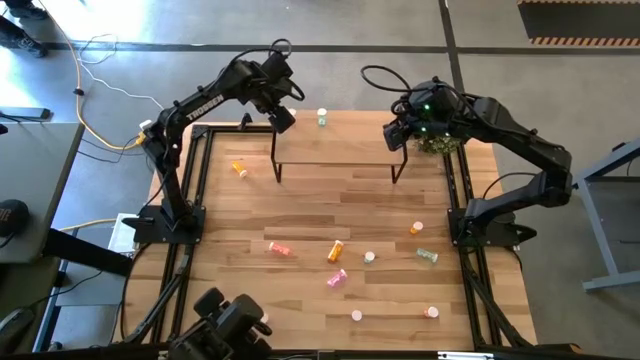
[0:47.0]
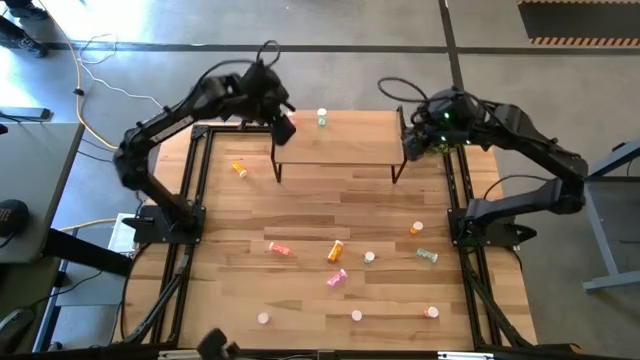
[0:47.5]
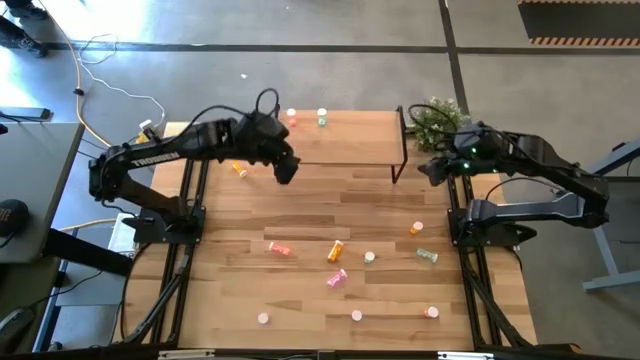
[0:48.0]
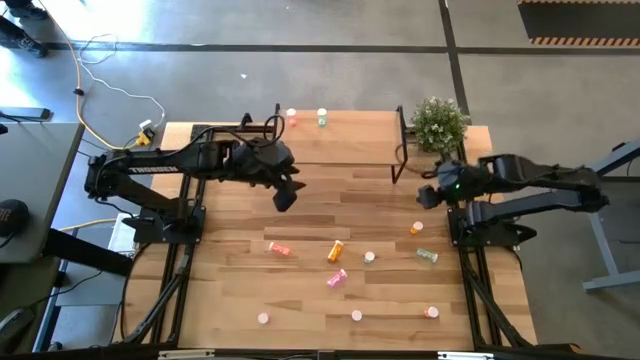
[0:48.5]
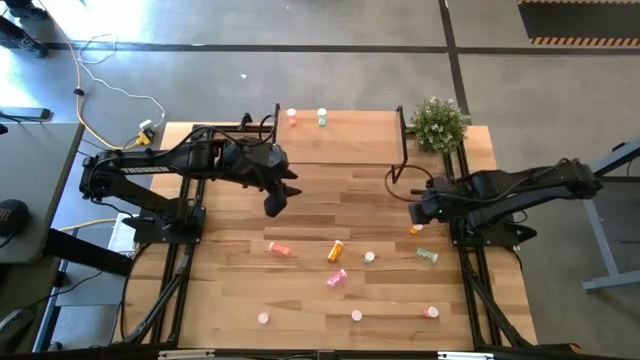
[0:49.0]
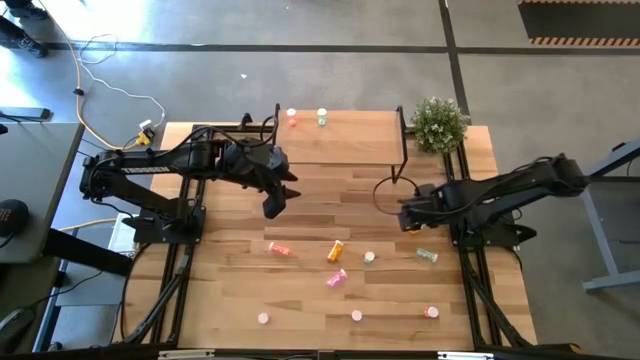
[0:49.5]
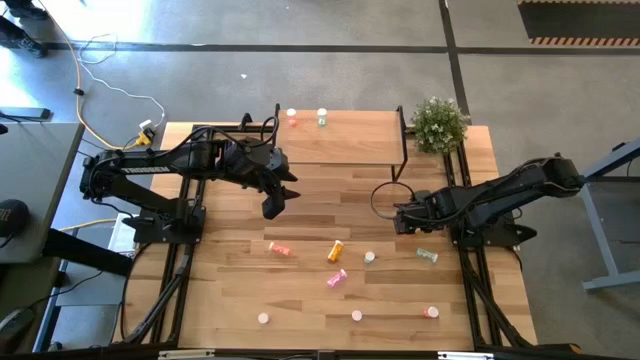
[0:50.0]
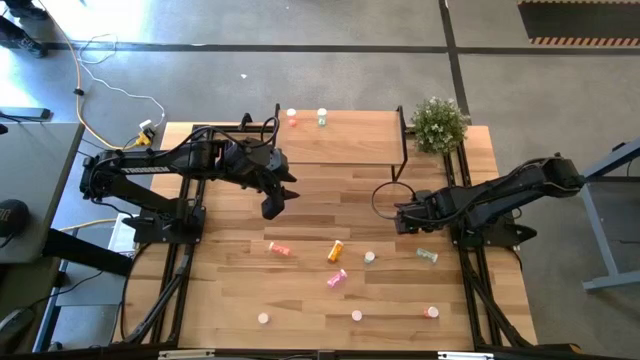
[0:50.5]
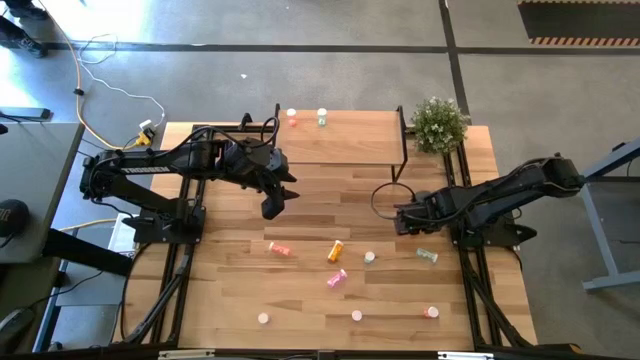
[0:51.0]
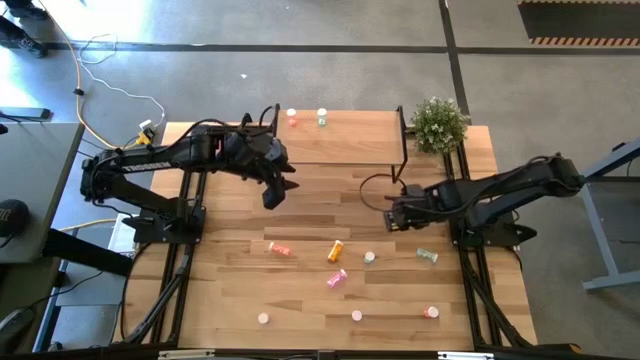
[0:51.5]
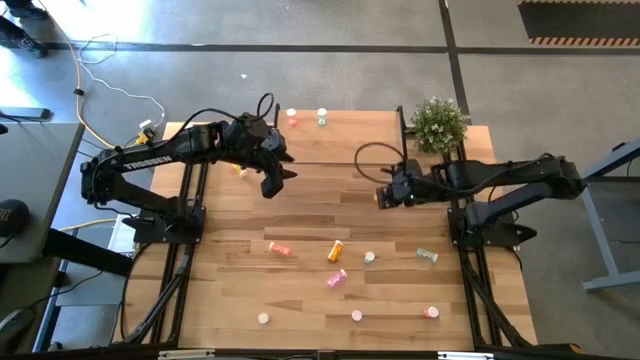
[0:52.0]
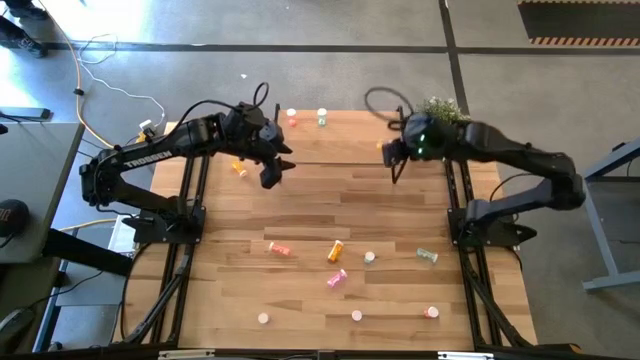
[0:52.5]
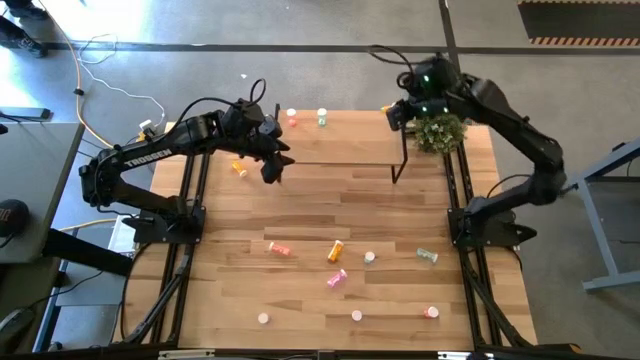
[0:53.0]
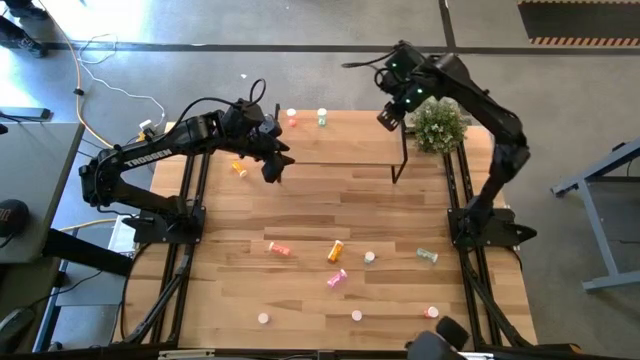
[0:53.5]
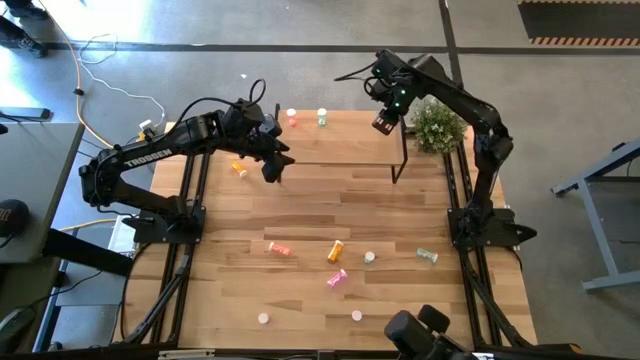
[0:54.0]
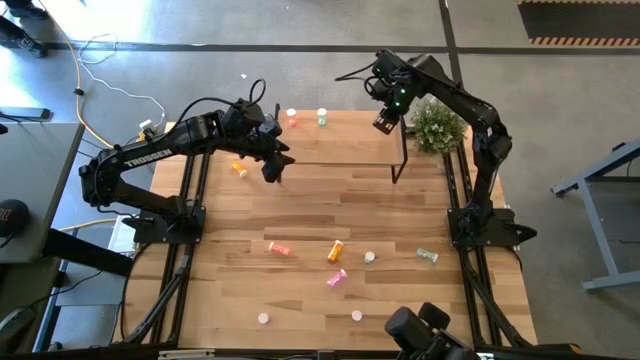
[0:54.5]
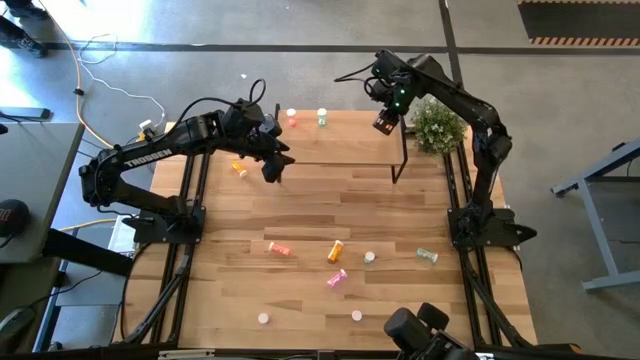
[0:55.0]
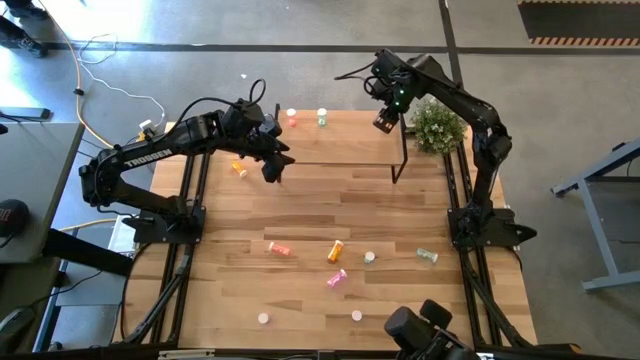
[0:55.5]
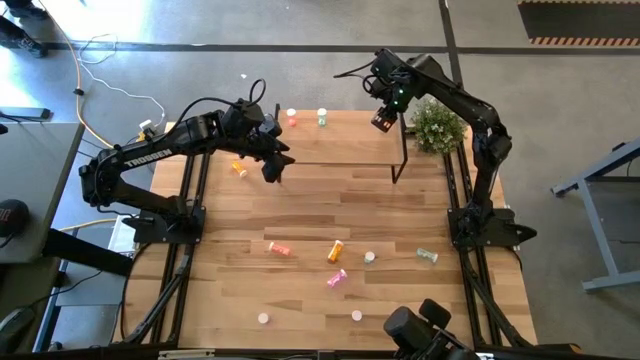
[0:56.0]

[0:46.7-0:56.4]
Task: Pick and place medicine bottles onto shelf by color
Put the middle yellow pill bottle on the shelf

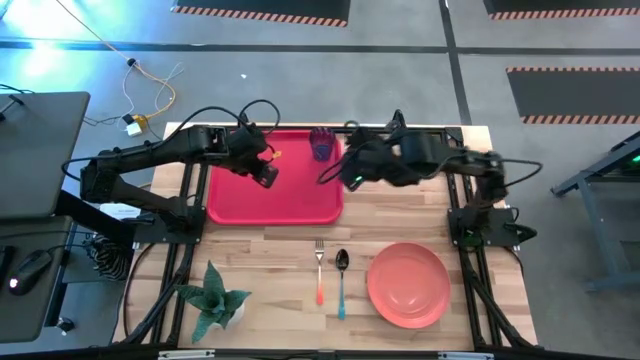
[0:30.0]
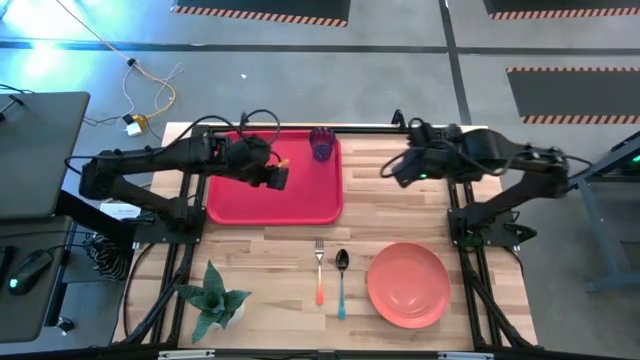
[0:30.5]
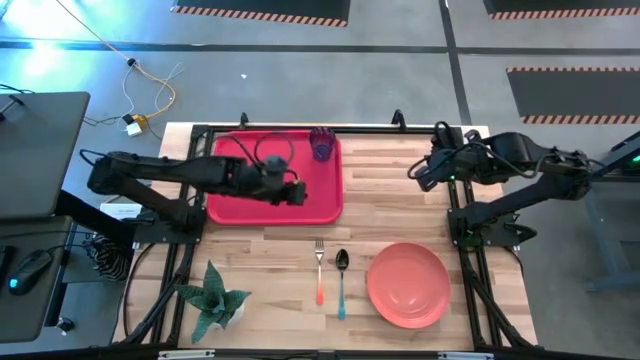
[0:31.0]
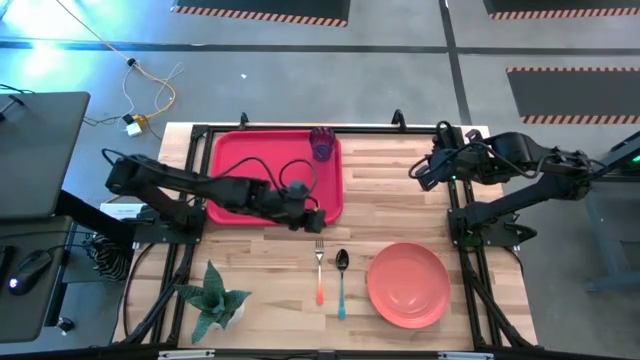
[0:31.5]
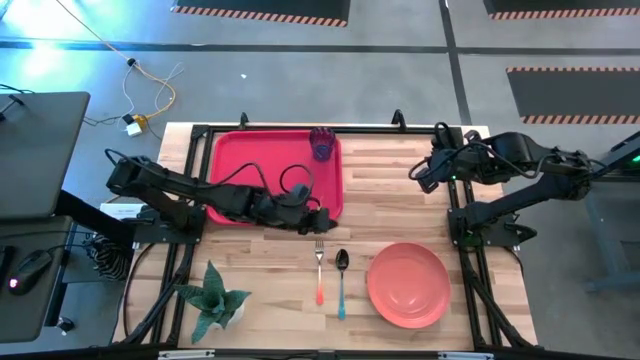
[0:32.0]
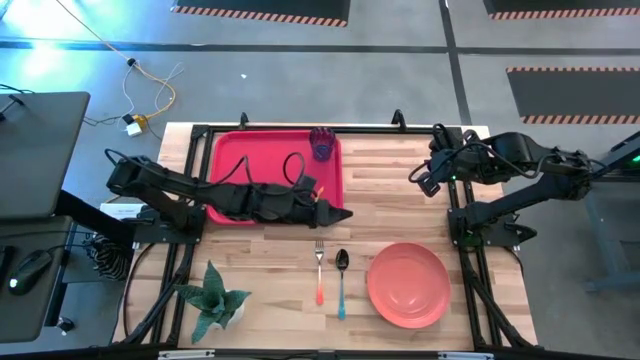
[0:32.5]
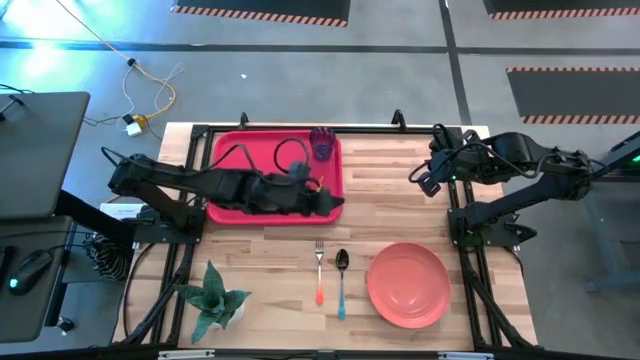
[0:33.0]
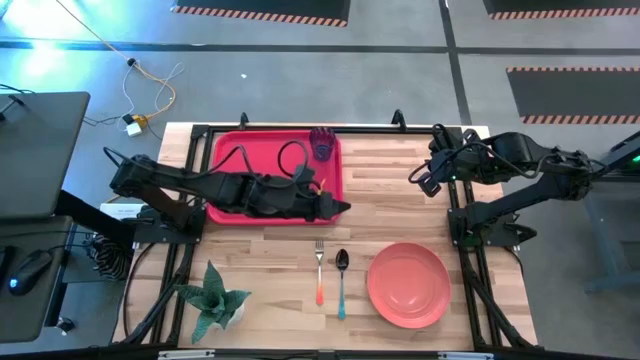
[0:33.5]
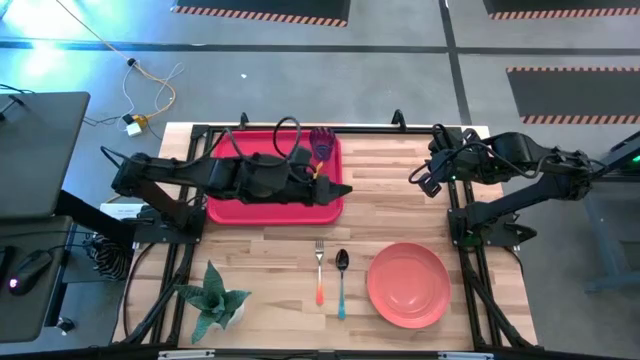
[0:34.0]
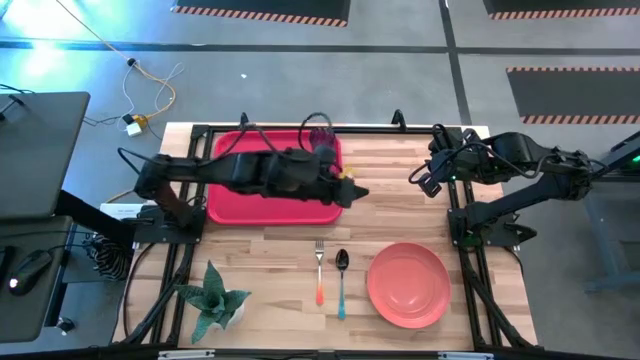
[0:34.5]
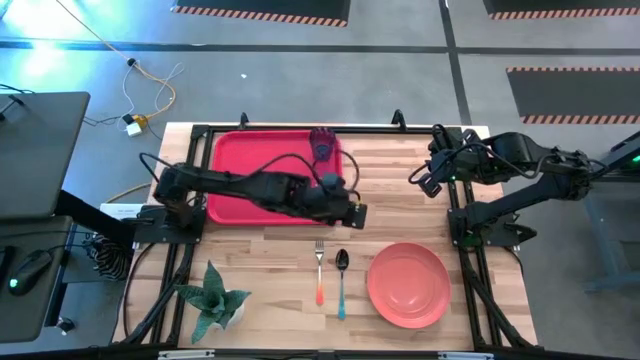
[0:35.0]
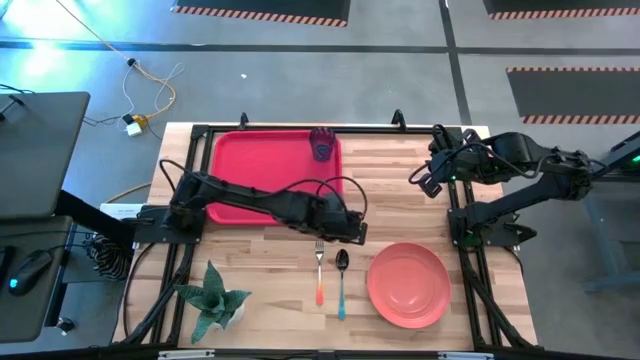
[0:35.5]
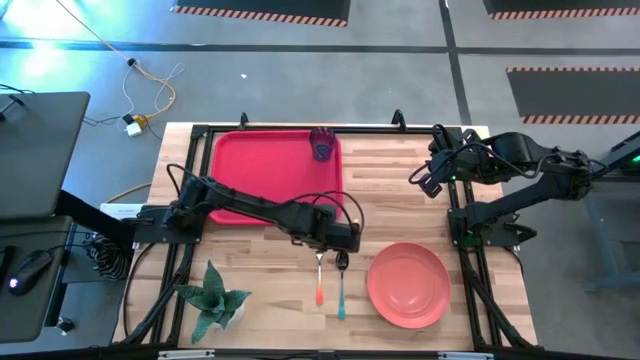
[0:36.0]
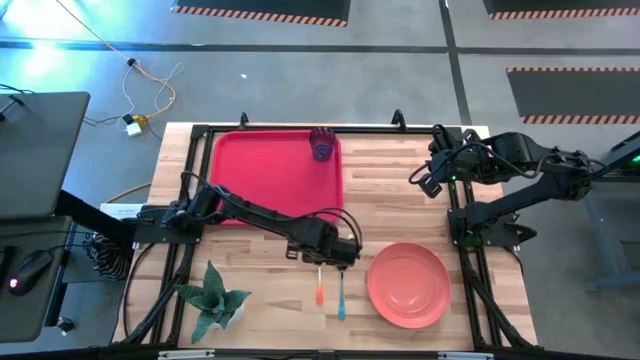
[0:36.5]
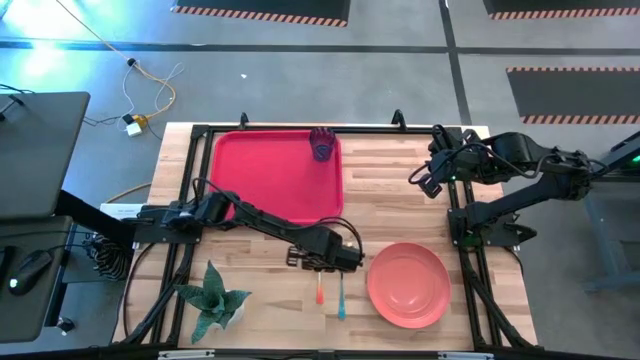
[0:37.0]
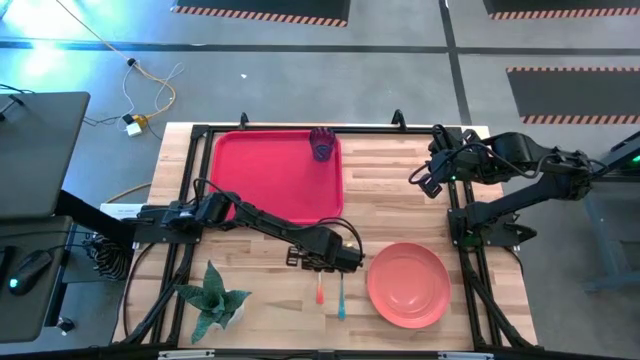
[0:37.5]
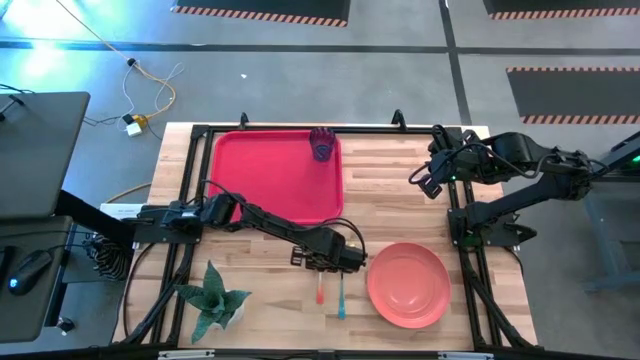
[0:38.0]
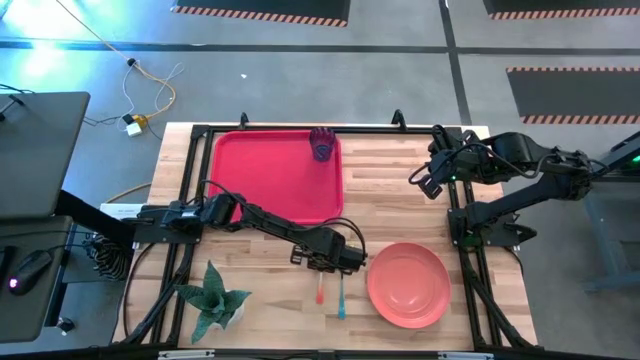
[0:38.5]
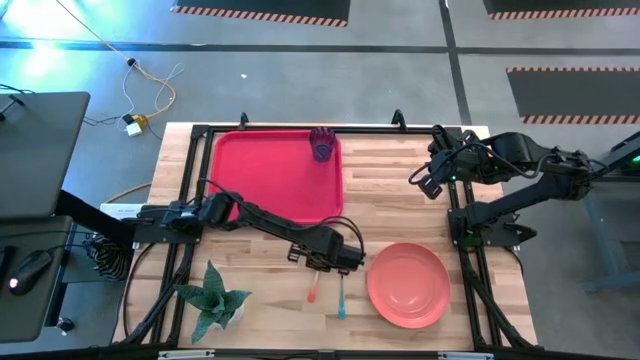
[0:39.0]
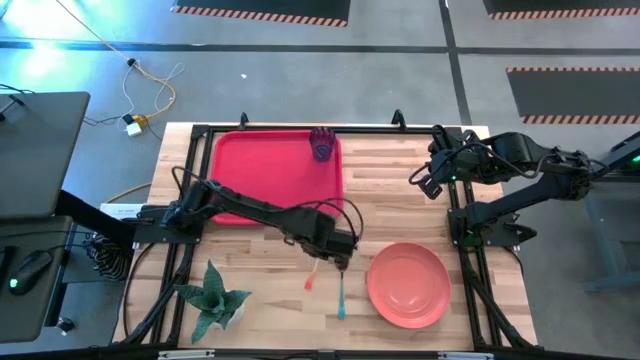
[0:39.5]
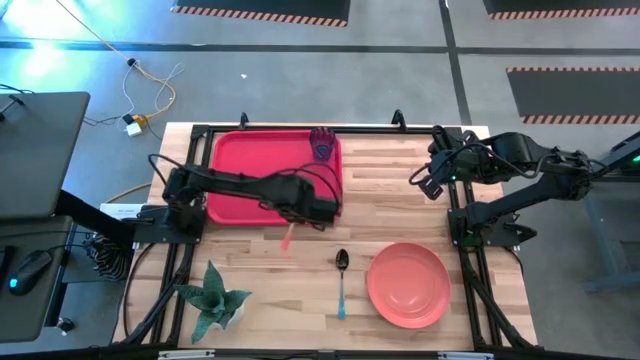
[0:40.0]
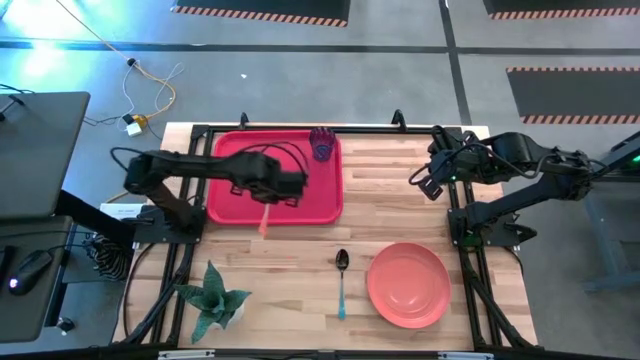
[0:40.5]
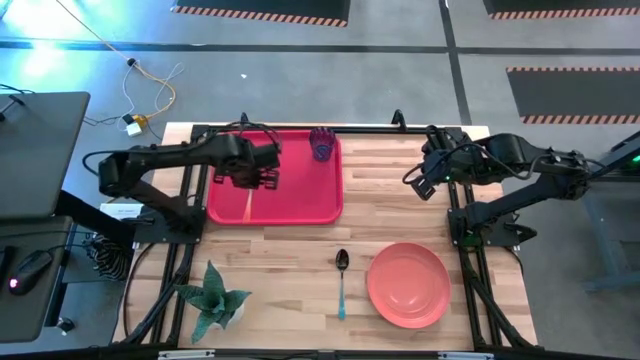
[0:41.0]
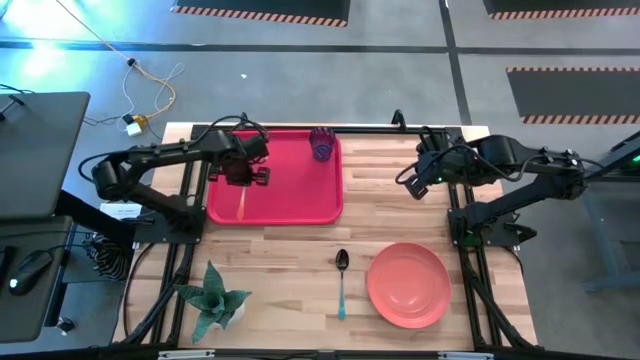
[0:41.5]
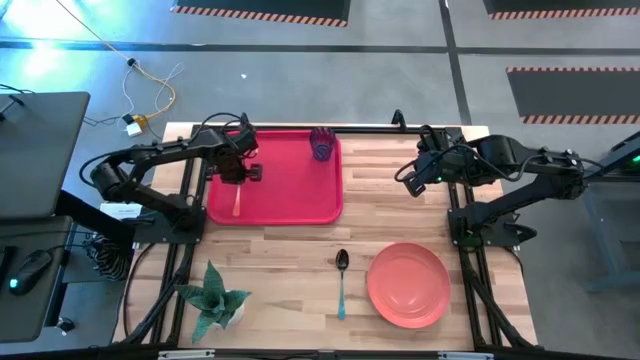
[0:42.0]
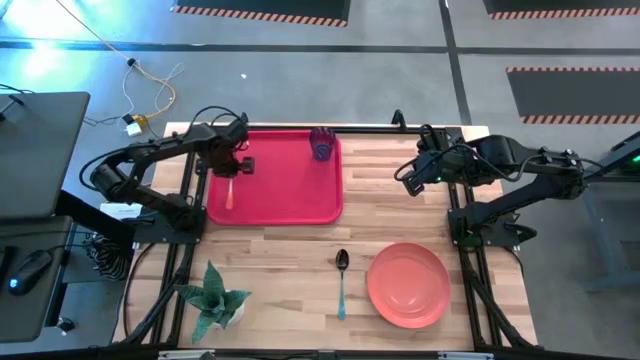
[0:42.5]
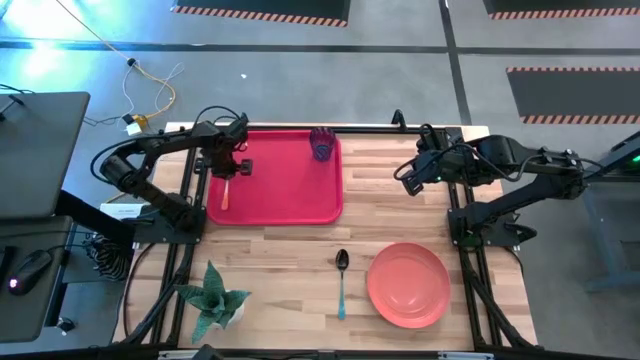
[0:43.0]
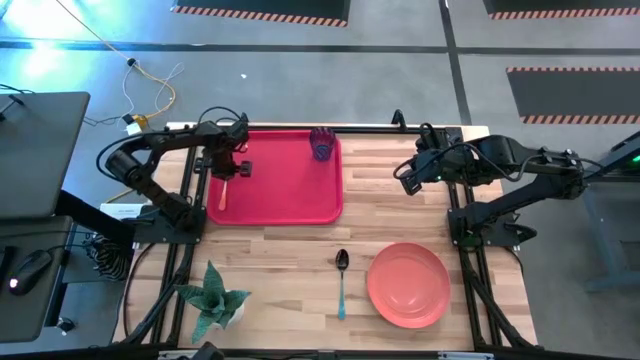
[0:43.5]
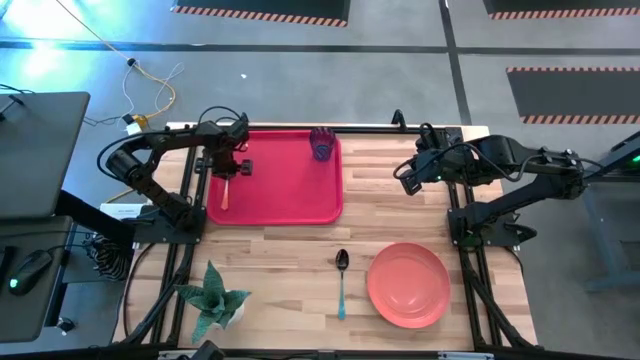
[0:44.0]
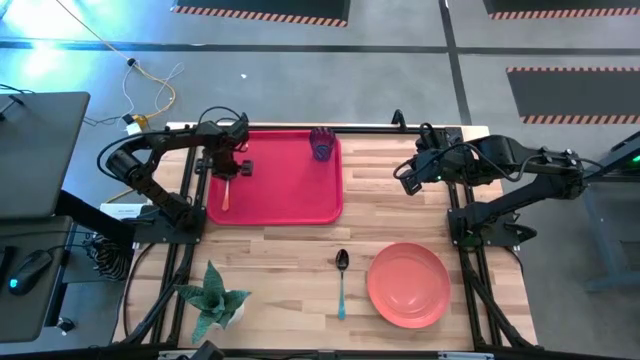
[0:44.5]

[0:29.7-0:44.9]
Task: Pick and place plate/cup/fork/spoon on tray
Put the orange fork on the left of the red serving tray
